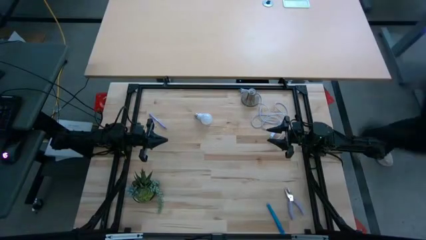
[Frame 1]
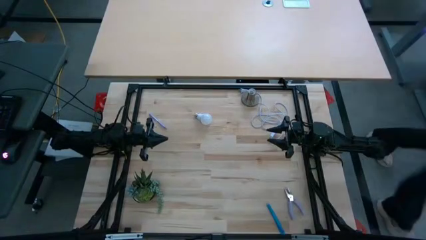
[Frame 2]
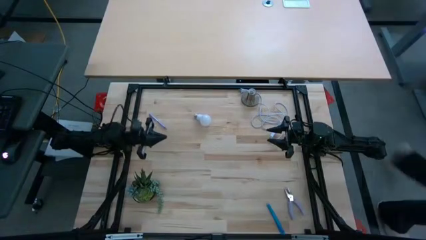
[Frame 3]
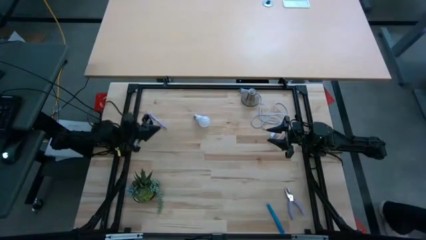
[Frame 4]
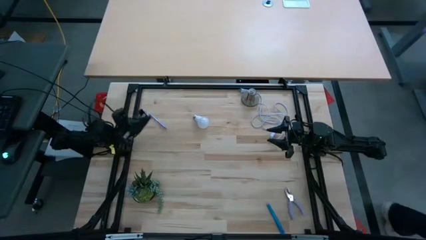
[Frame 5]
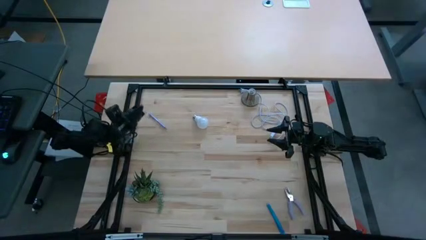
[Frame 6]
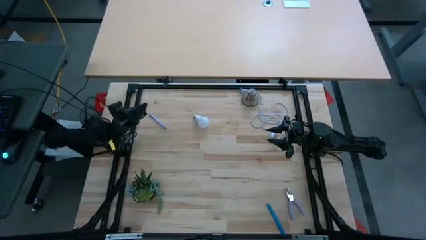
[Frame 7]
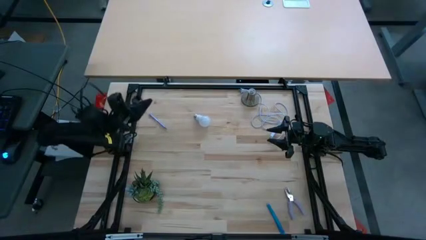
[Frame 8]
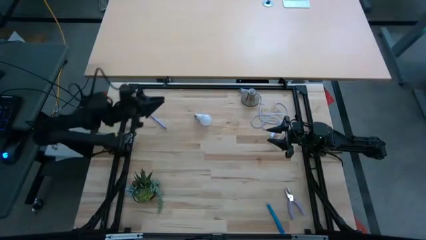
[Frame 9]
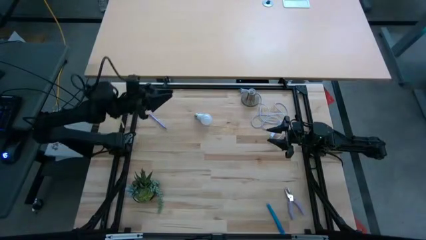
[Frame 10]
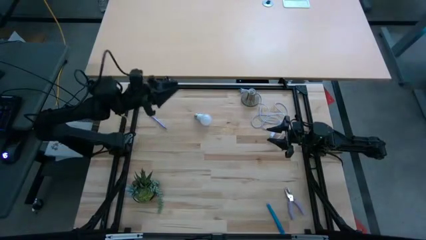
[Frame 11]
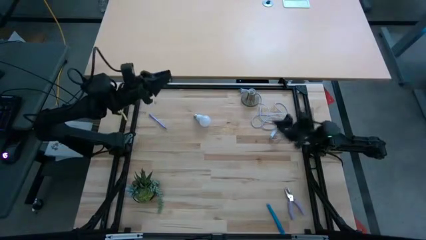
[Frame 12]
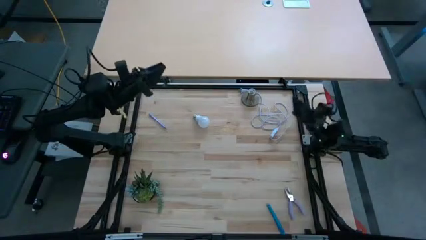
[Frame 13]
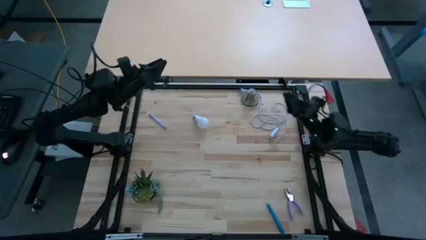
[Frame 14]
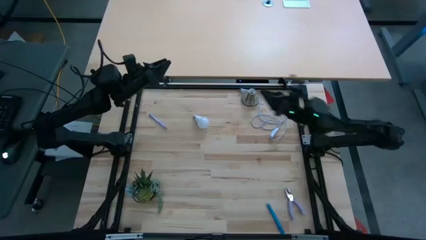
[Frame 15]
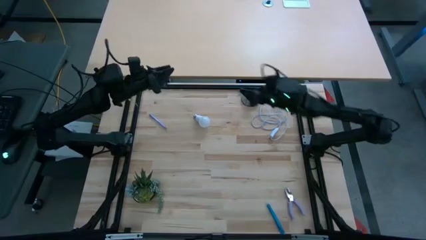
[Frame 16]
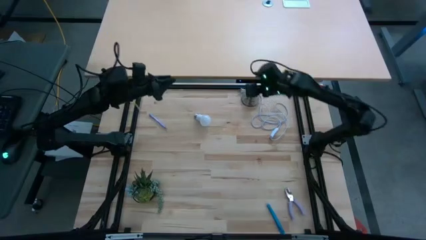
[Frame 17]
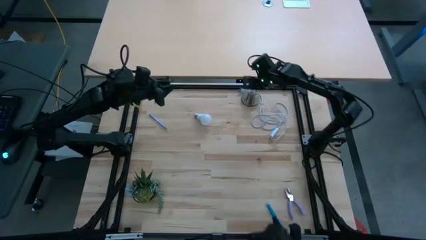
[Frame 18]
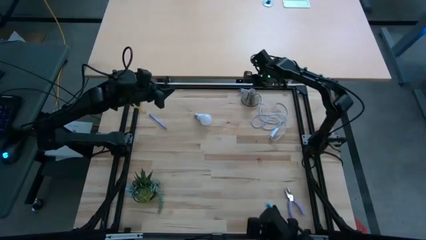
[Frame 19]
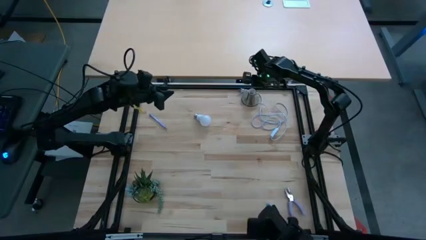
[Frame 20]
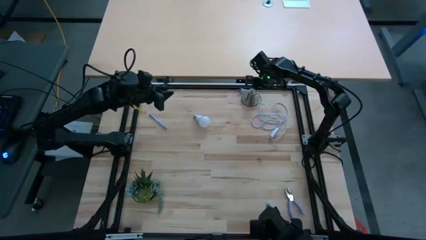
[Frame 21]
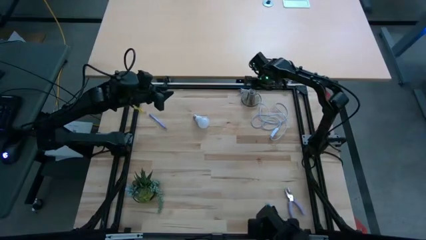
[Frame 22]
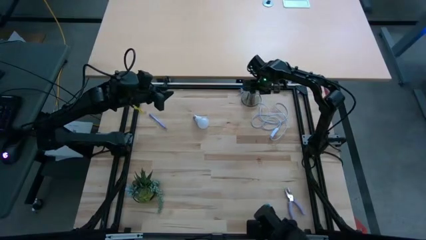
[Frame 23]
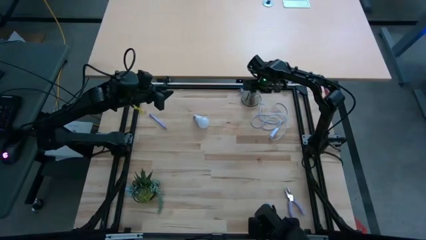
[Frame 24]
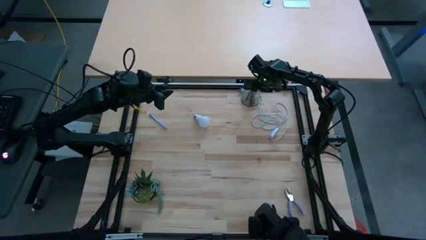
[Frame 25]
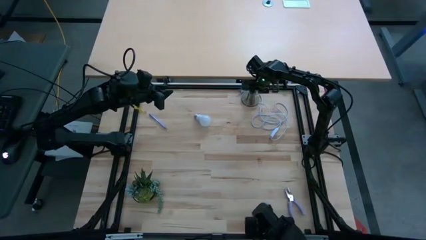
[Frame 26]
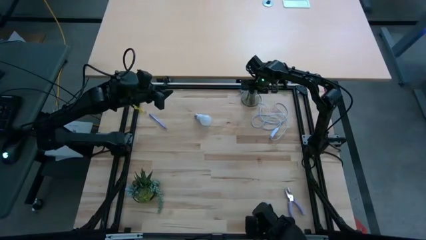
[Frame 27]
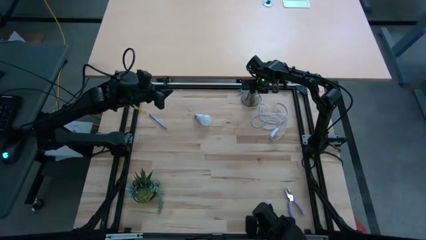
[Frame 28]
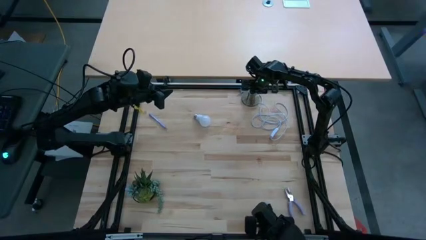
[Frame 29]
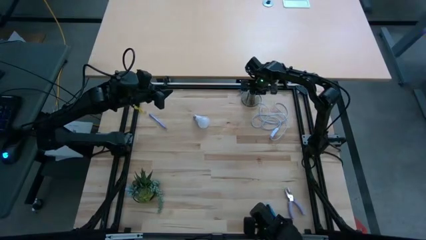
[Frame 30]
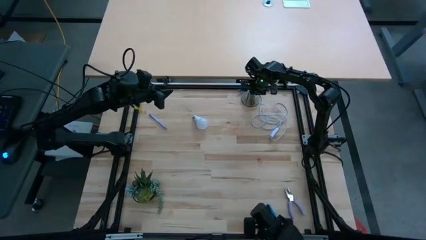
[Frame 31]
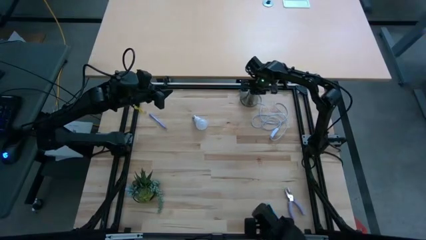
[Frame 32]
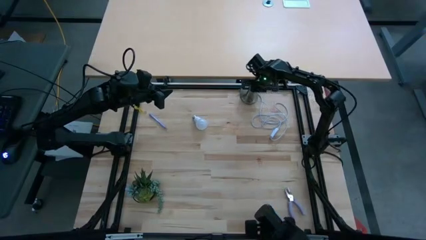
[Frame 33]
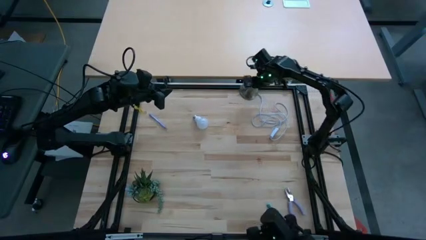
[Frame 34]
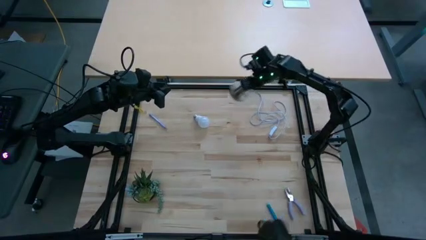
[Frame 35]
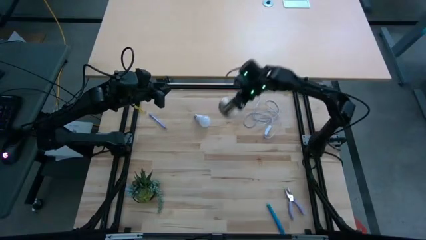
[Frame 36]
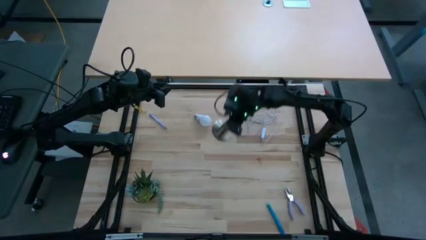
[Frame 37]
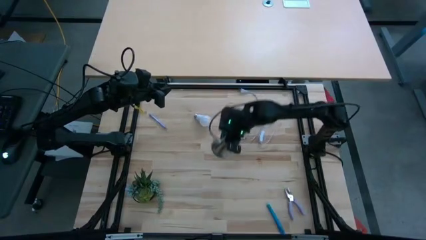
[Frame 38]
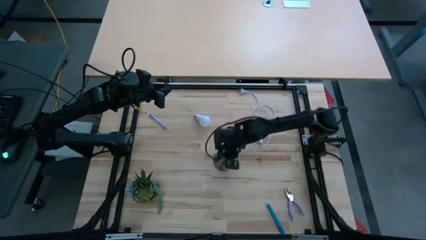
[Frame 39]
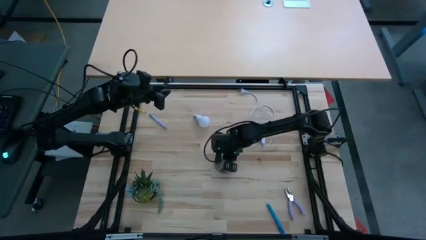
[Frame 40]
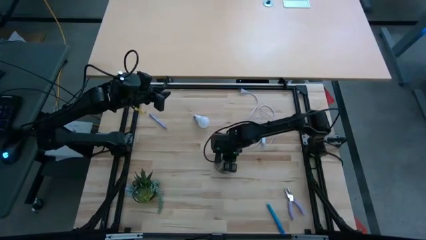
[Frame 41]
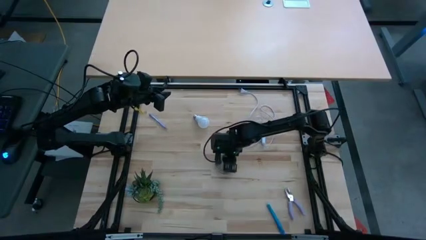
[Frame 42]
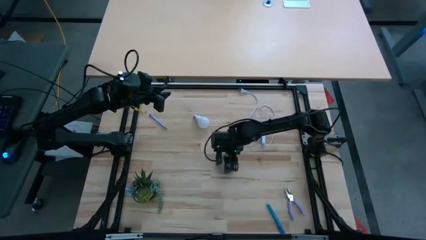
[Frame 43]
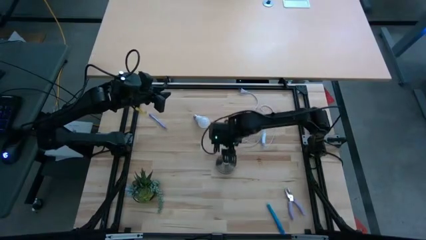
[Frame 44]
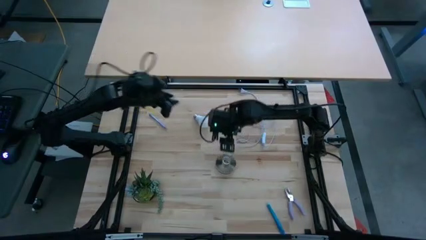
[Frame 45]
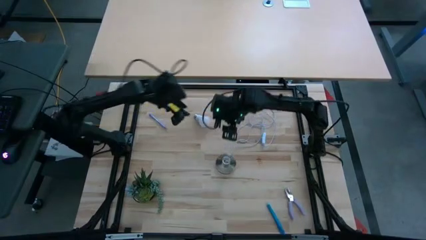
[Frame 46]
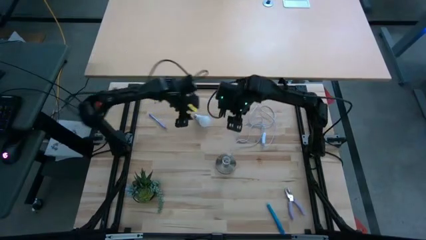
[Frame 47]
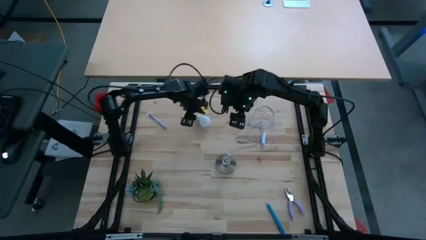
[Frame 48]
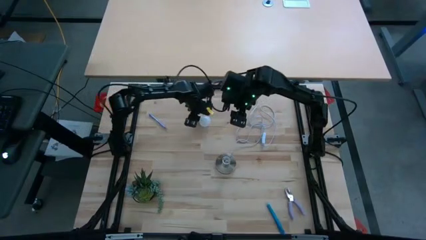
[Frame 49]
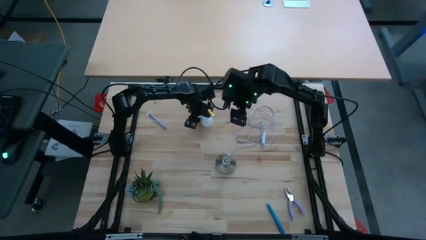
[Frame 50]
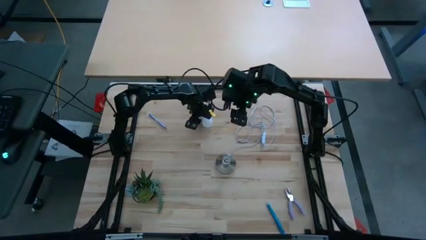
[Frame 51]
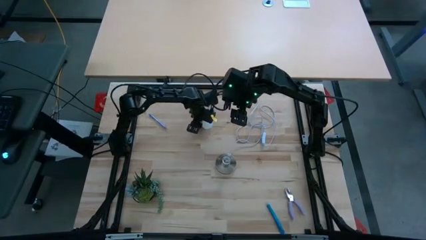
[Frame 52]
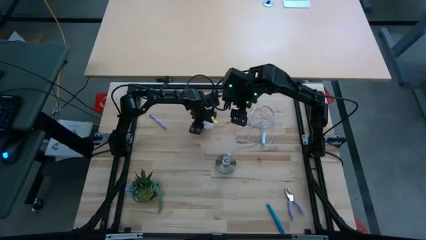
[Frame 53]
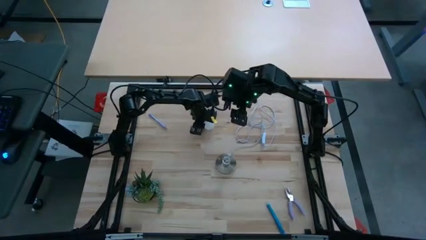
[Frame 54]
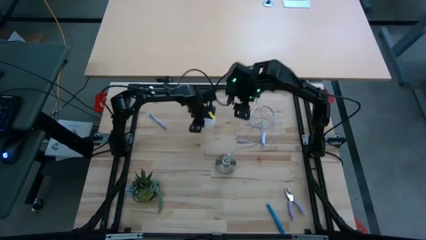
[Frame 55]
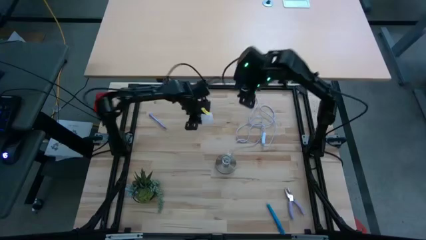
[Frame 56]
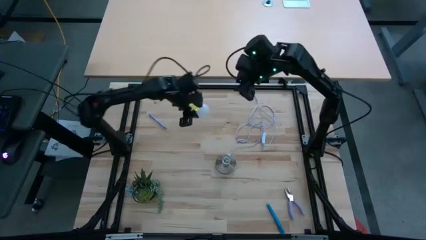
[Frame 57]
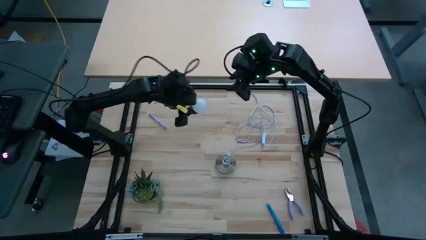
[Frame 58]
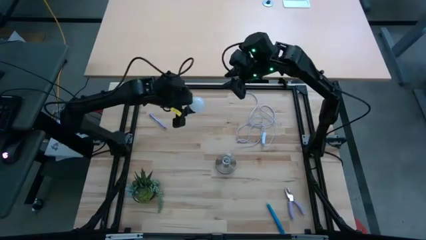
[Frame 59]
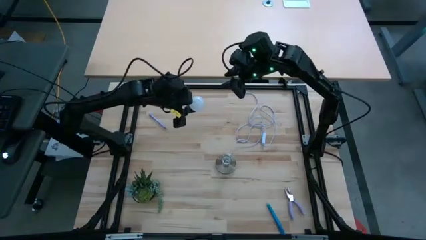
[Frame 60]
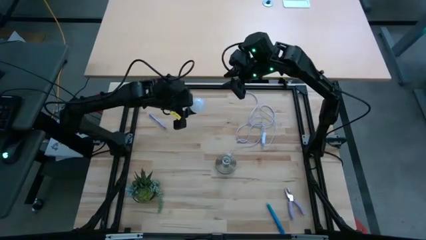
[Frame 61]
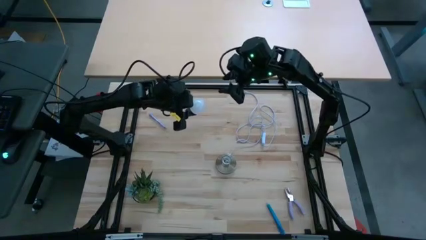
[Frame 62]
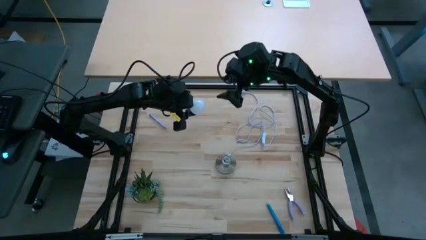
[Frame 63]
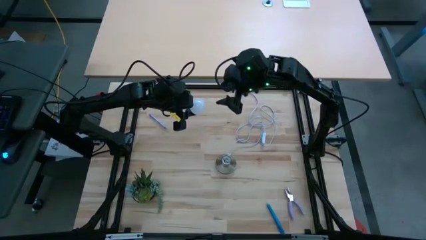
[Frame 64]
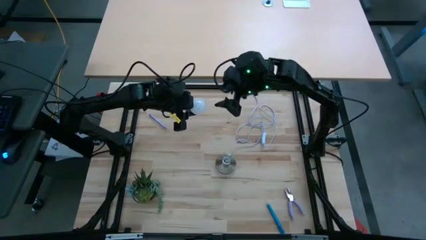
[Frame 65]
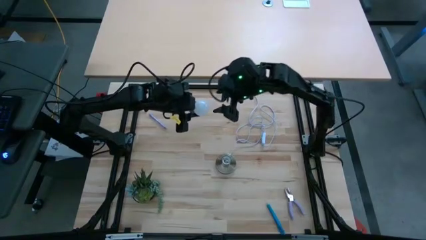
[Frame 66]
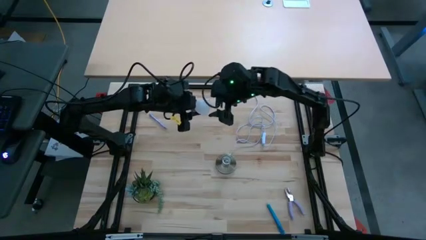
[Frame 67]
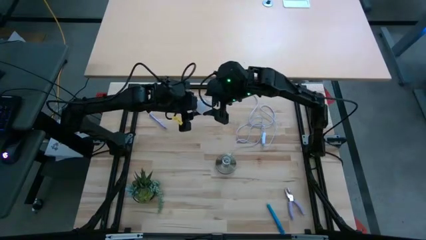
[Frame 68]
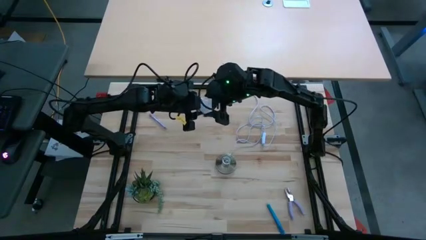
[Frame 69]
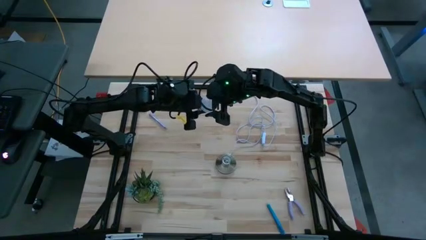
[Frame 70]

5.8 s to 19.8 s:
Task: Screw lightbulb
Insert the lightbulb in the lamp
